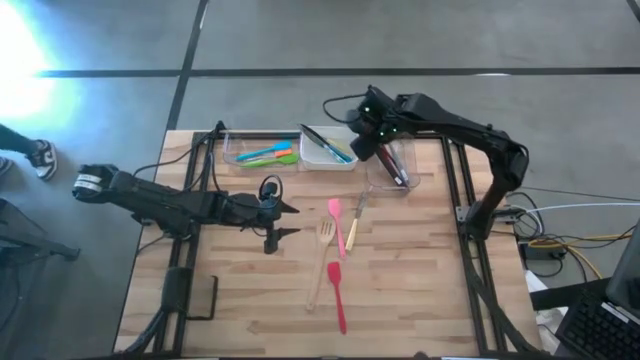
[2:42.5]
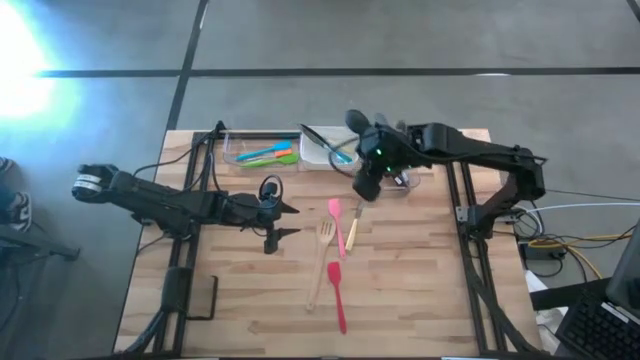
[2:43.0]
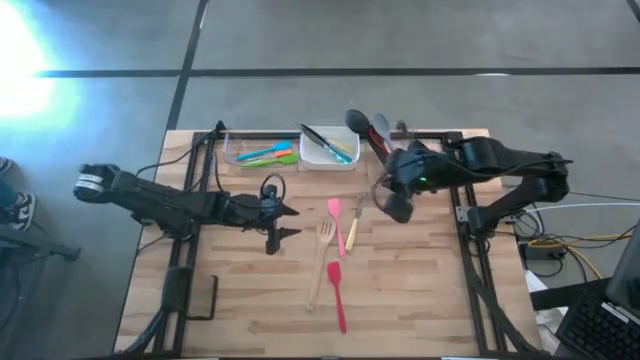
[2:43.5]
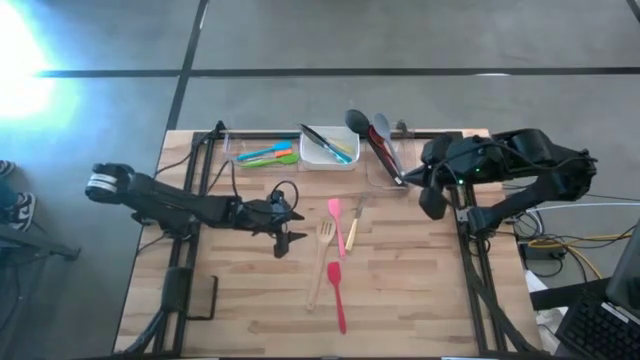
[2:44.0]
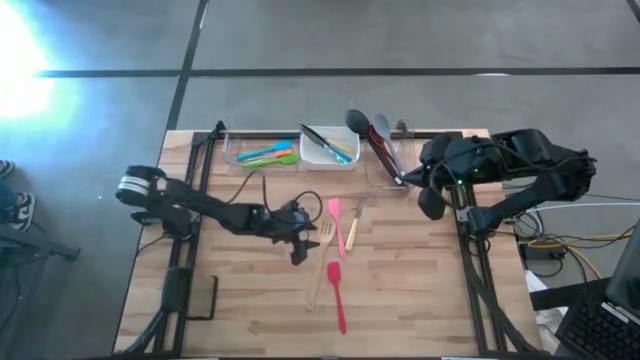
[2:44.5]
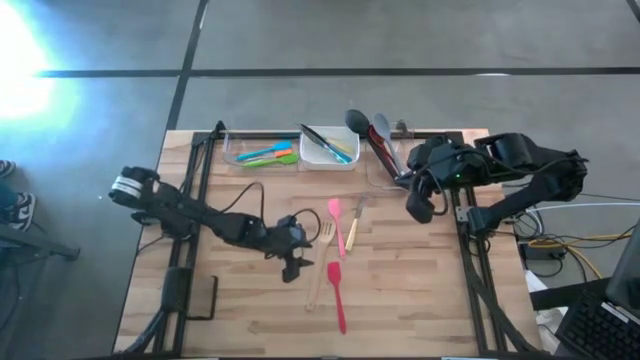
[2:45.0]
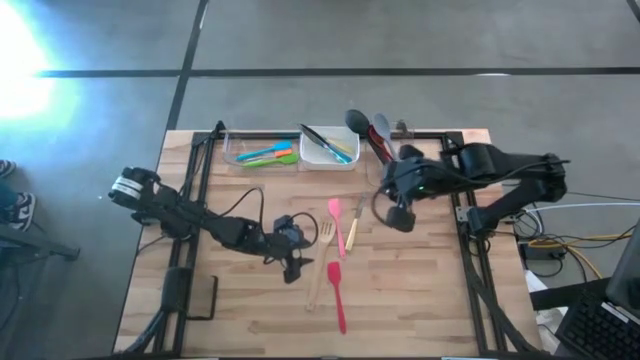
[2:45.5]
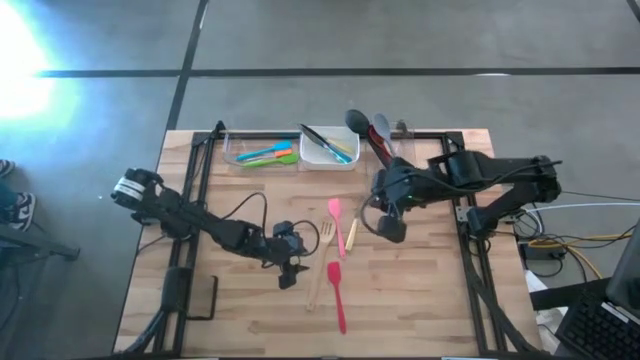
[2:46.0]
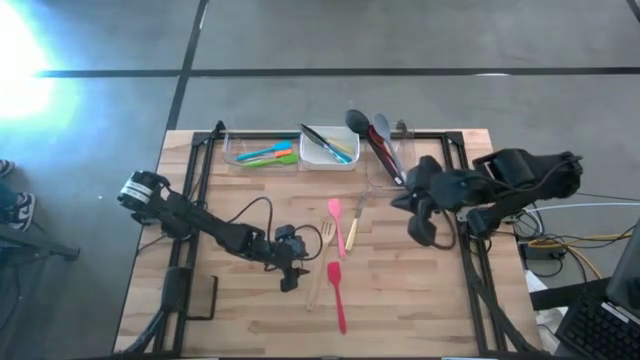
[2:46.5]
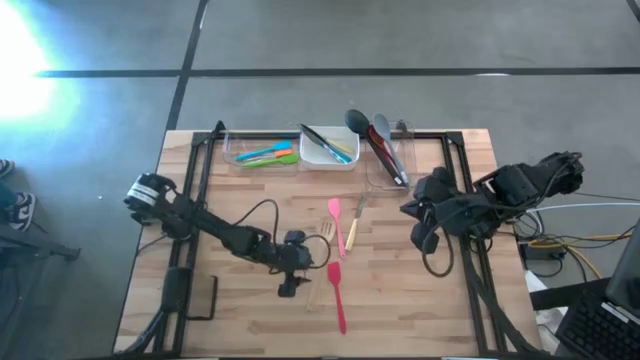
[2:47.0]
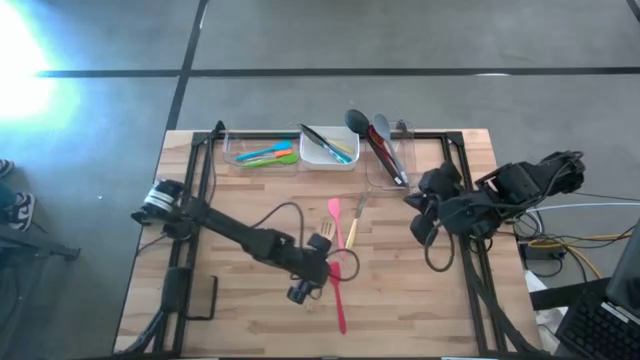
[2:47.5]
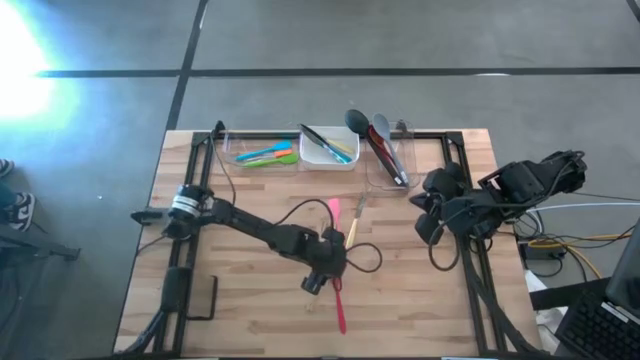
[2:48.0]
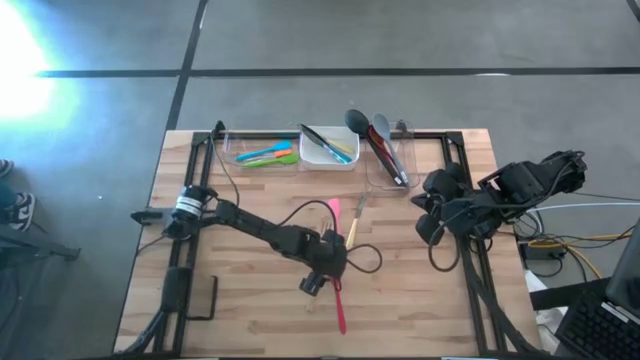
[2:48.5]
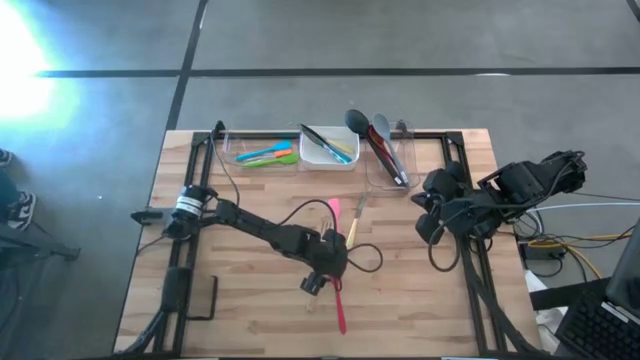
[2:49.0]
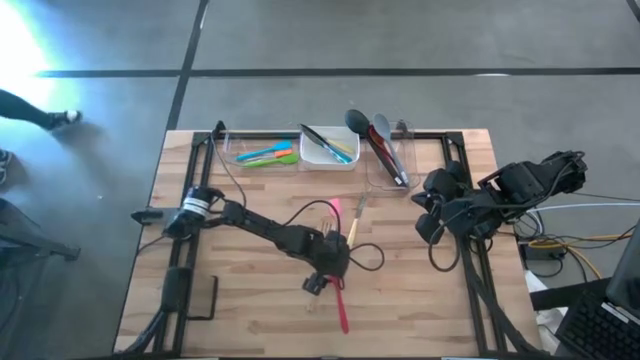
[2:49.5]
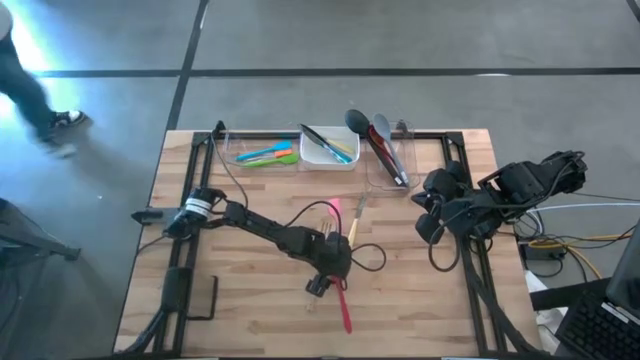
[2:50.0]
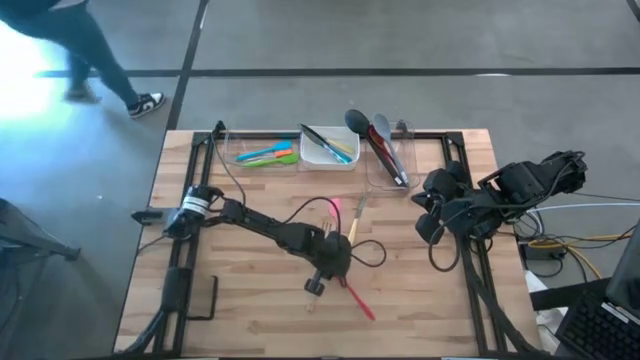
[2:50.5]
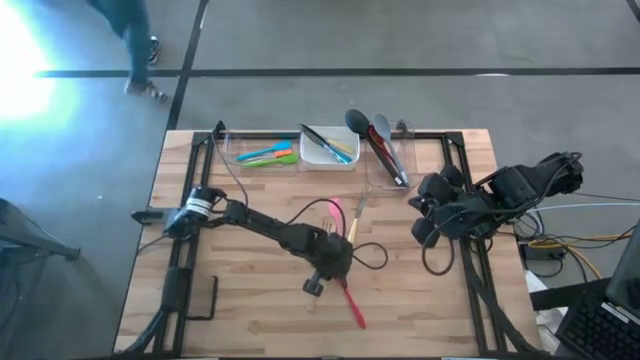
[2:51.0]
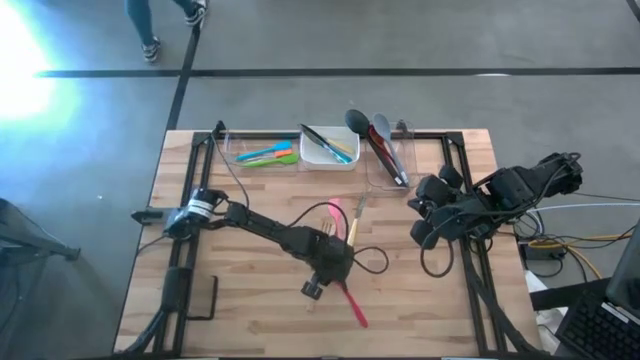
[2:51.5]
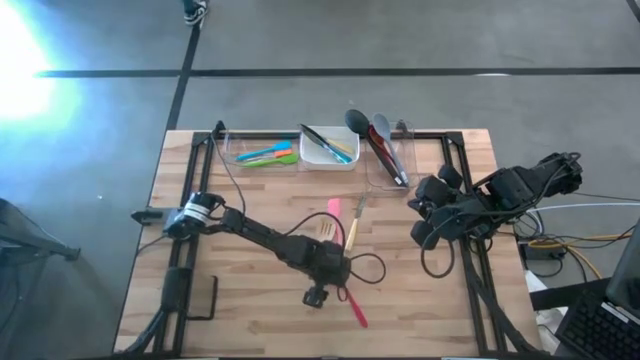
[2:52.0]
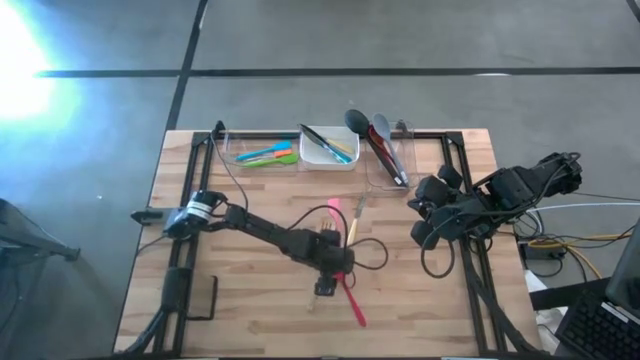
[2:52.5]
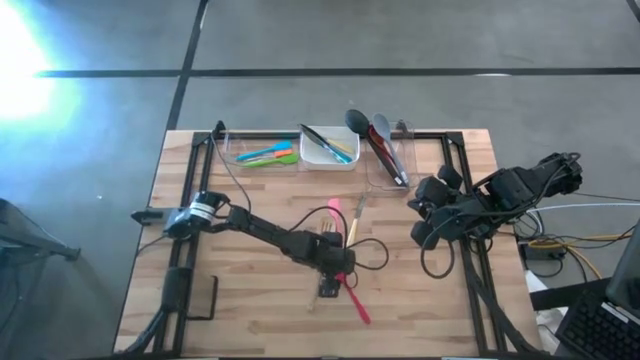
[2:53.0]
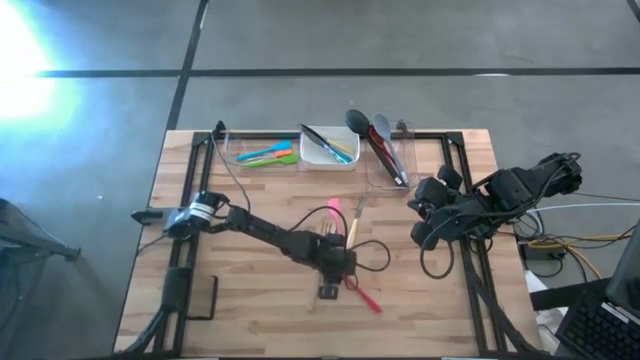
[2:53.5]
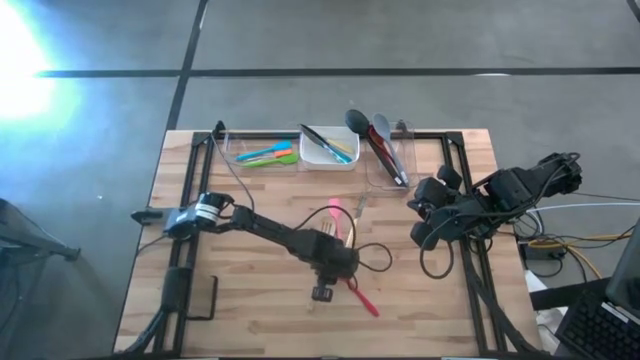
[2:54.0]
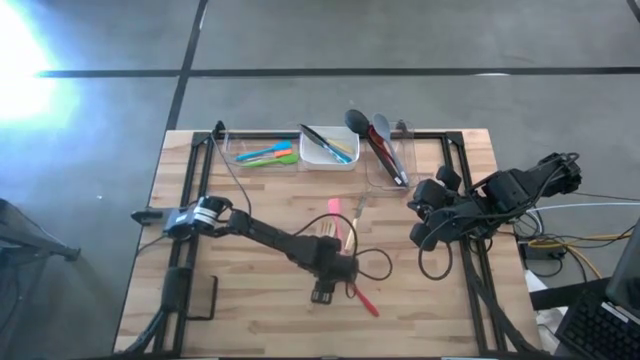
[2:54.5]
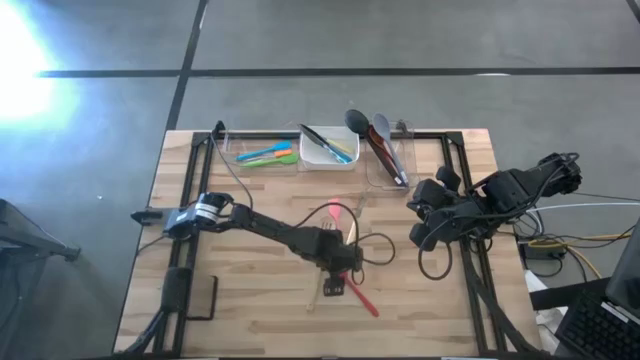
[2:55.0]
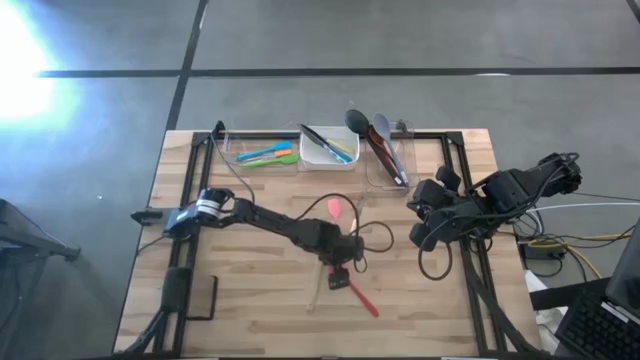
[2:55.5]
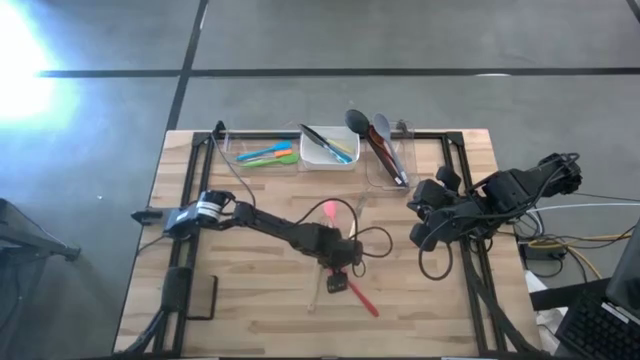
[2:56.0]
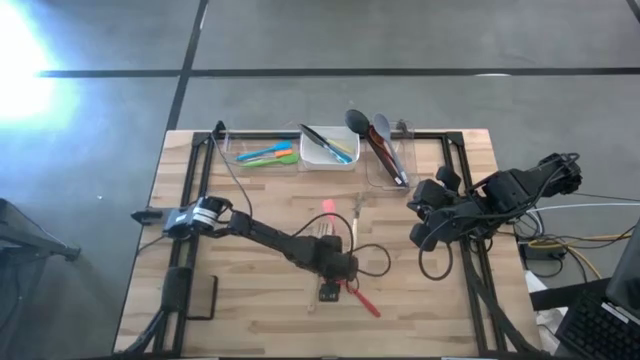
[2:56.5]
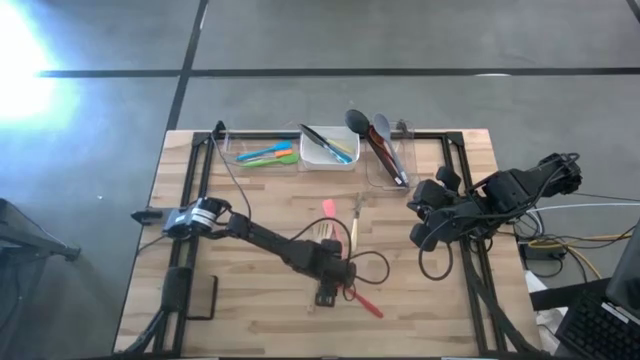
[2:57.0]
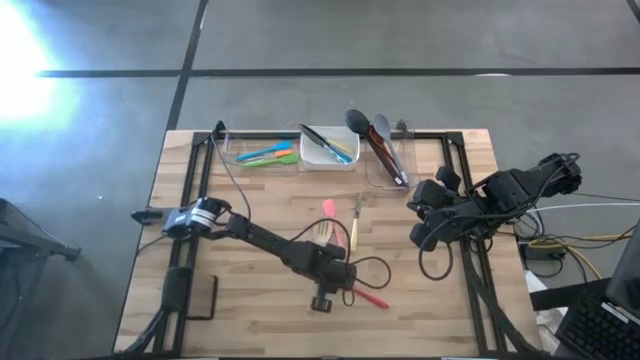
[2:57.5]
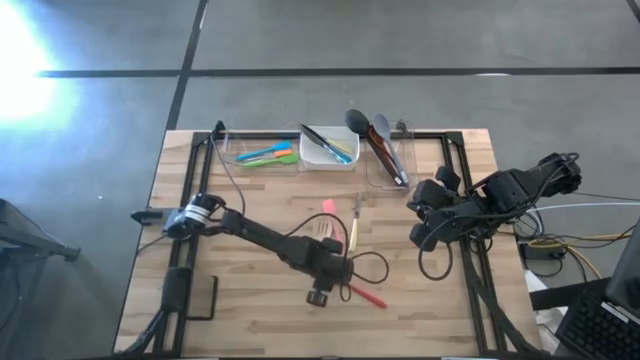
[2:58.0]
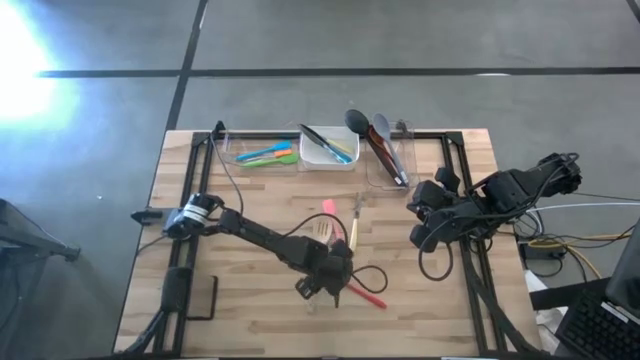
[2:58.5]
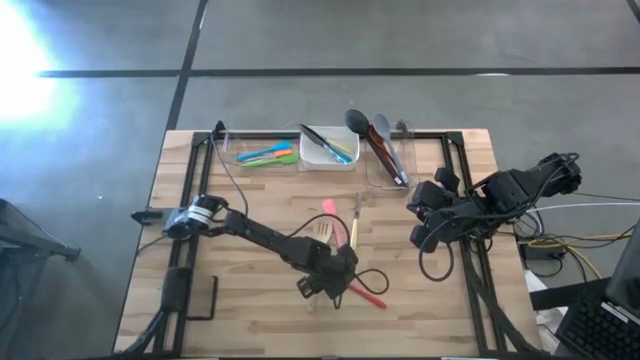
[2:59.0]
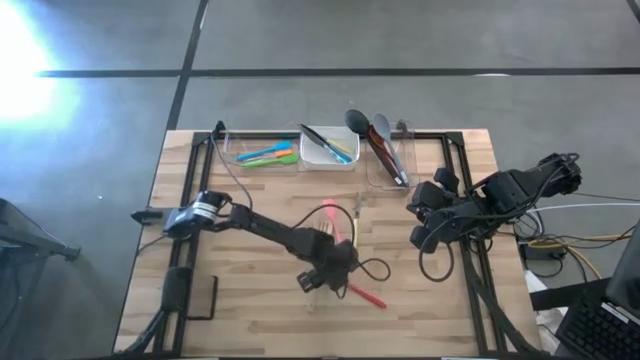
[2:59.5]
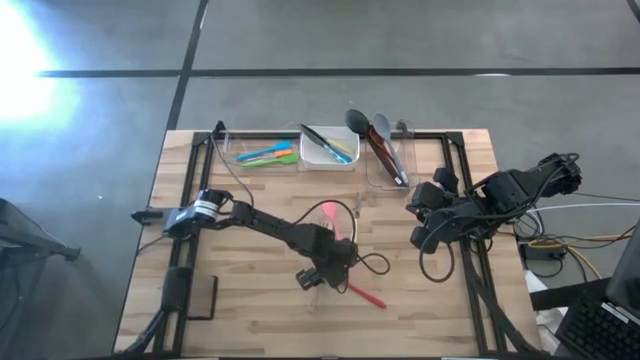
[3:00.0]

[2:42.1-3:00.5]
Task: Pick & Place Kitchen Items
Put the red spatula into the left transparent bin

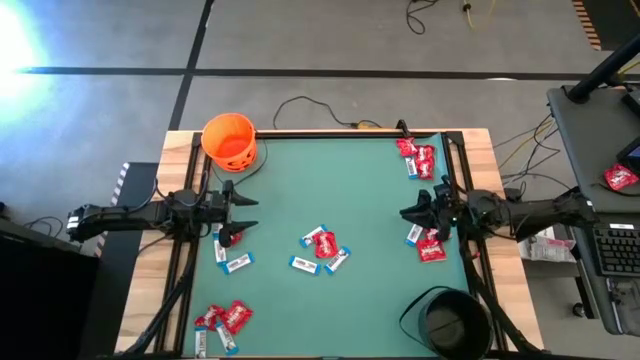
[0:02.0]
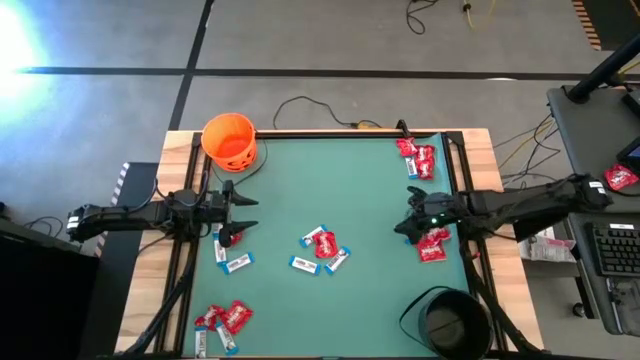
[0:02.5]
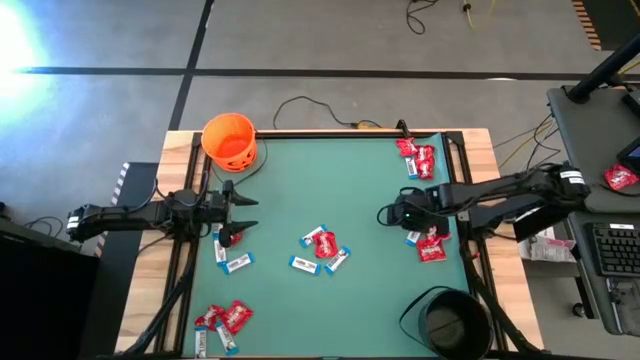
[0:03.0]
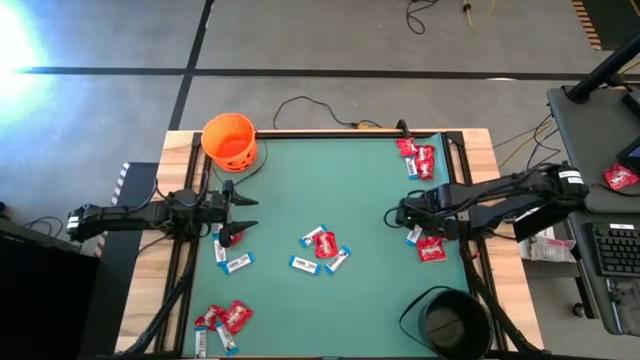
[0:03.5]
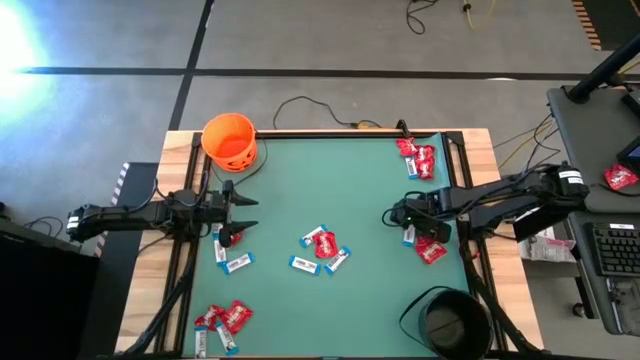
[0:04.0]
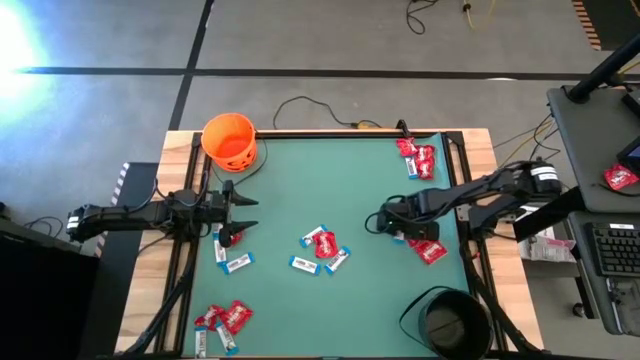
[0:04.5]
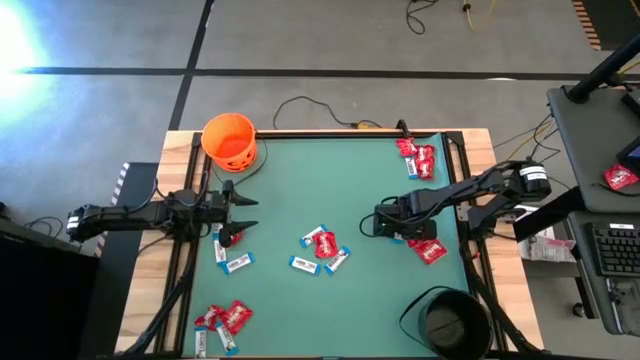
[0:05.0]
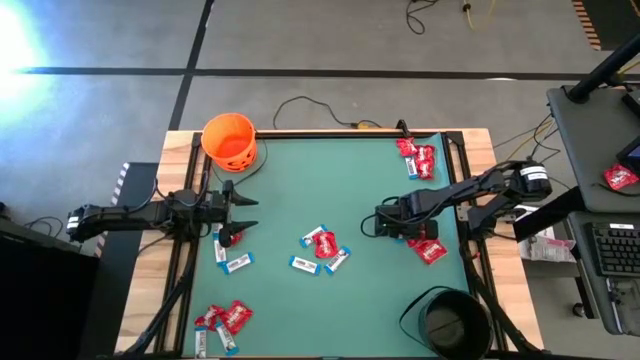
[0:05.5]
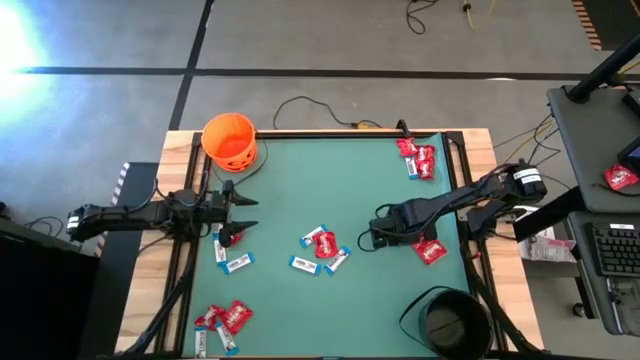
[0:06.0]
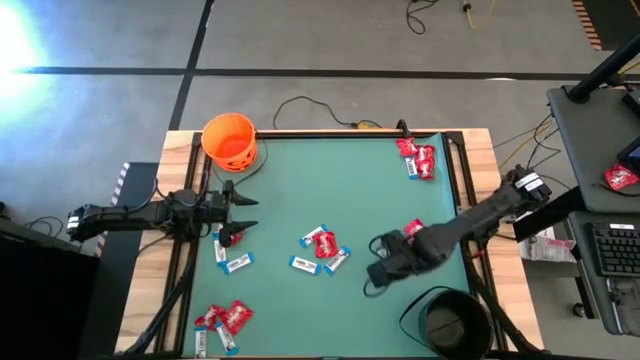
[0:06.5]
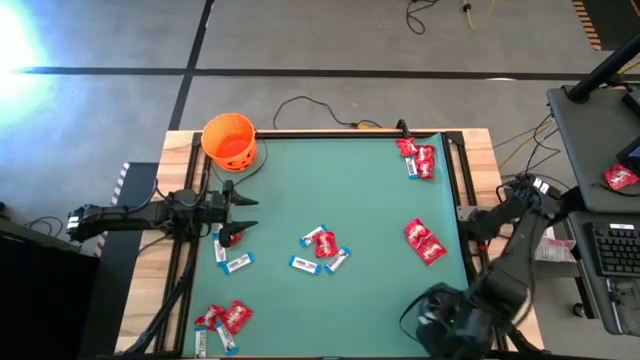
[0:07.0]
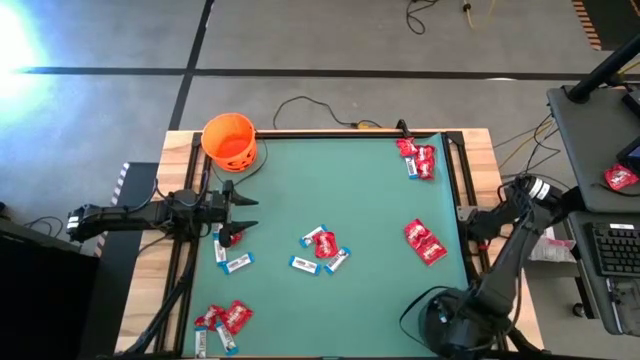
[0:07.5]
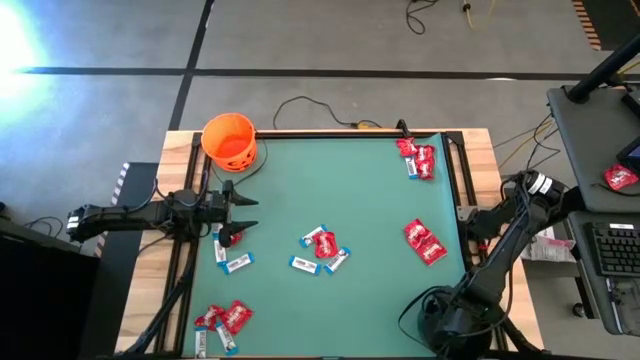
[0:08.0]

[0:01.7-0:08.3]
Task: Sort candy by brand, put in halloween buckets
Put the white chocolate into the black bucket
